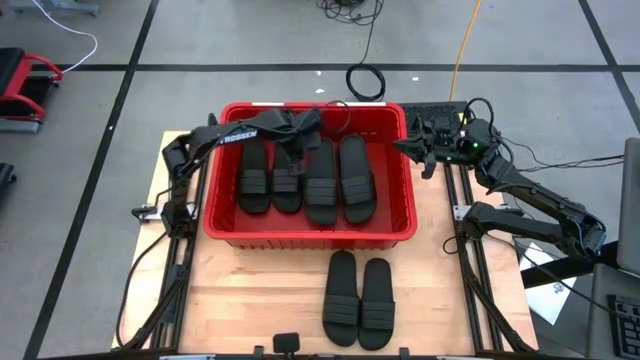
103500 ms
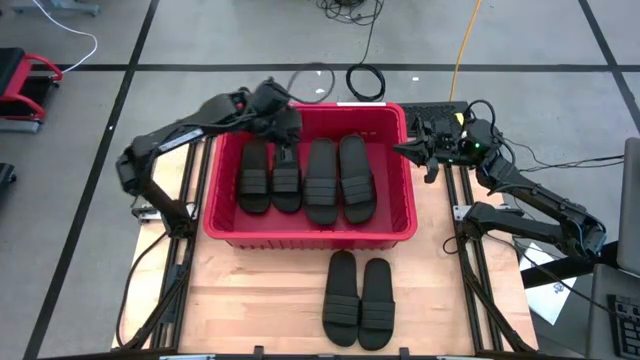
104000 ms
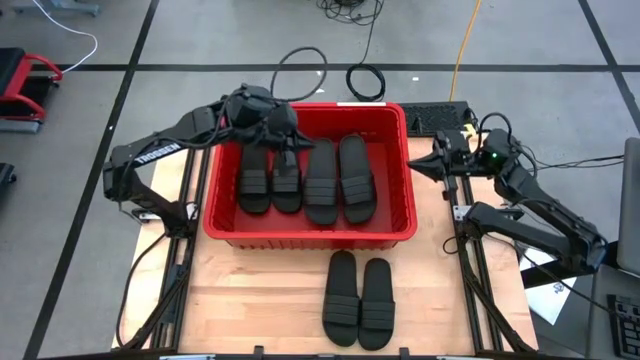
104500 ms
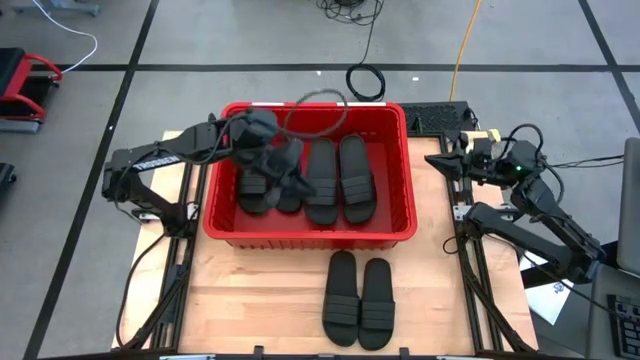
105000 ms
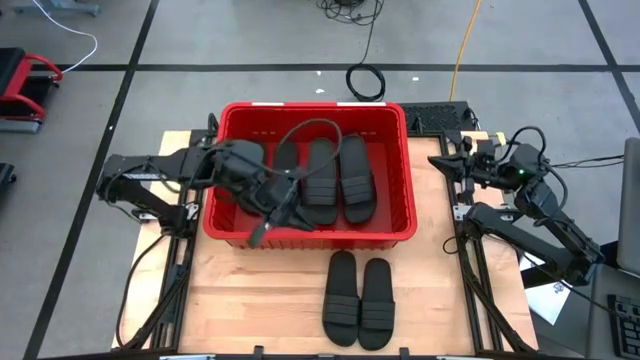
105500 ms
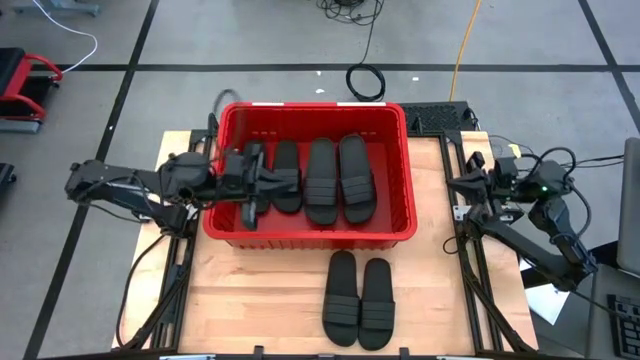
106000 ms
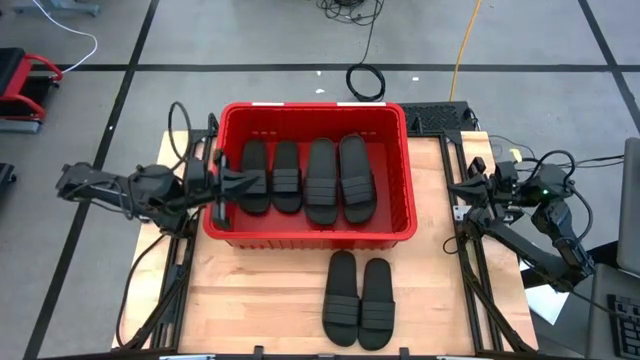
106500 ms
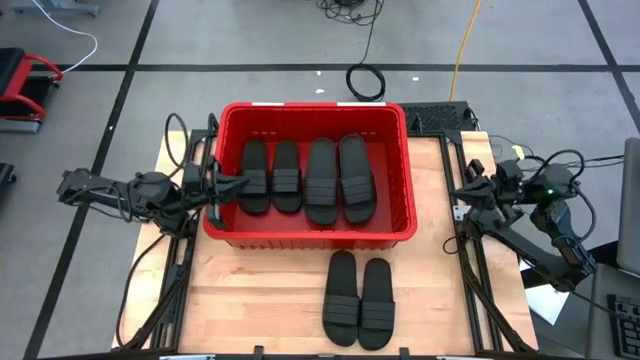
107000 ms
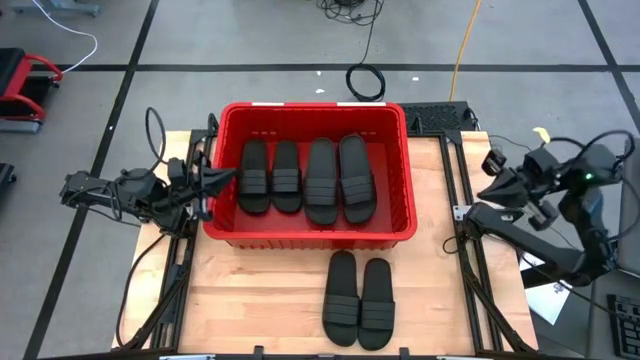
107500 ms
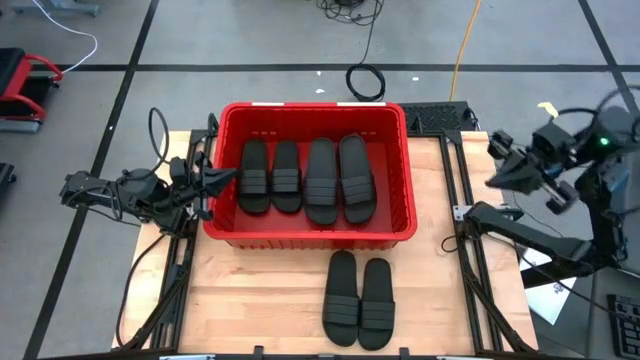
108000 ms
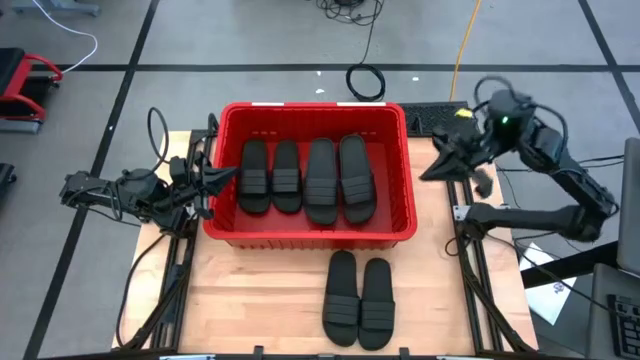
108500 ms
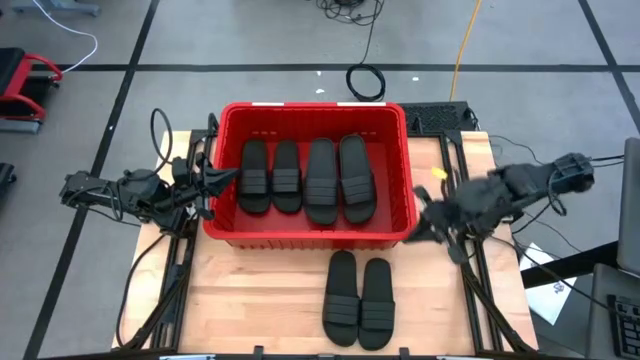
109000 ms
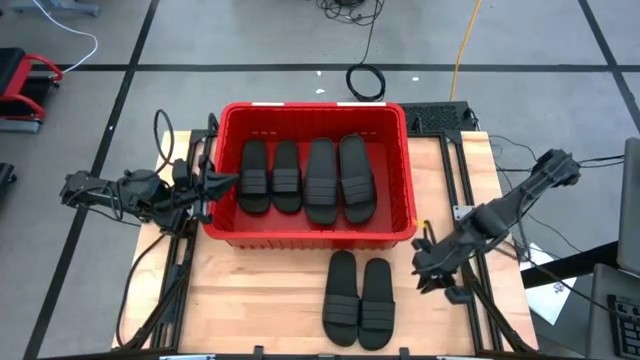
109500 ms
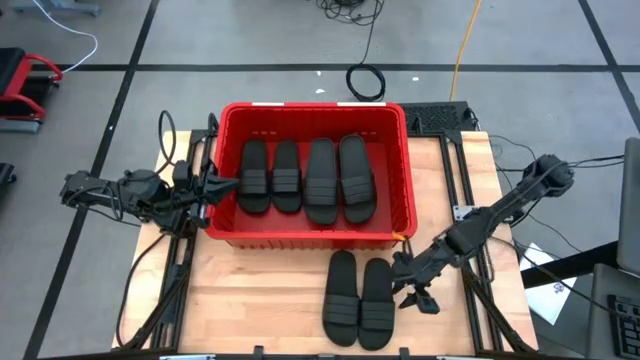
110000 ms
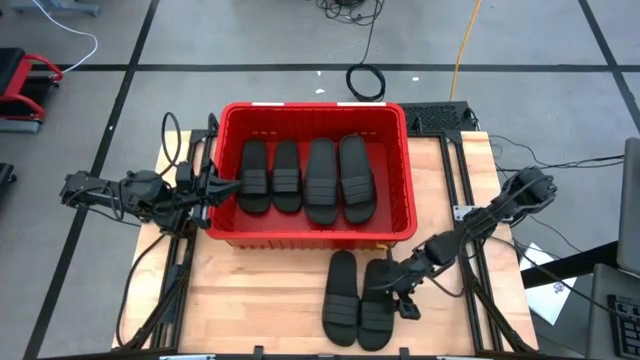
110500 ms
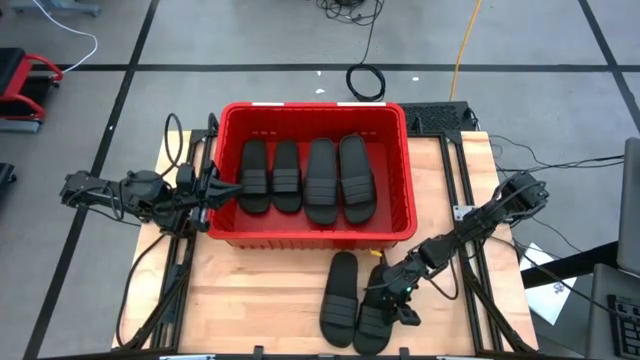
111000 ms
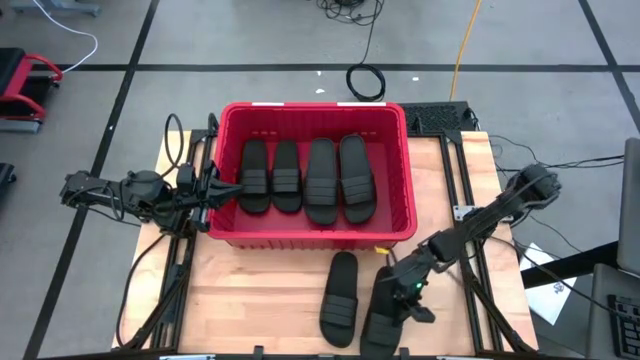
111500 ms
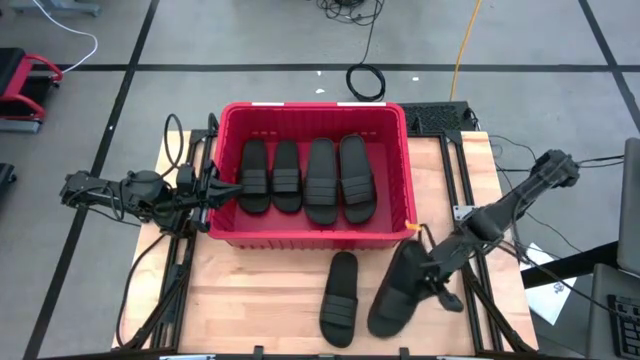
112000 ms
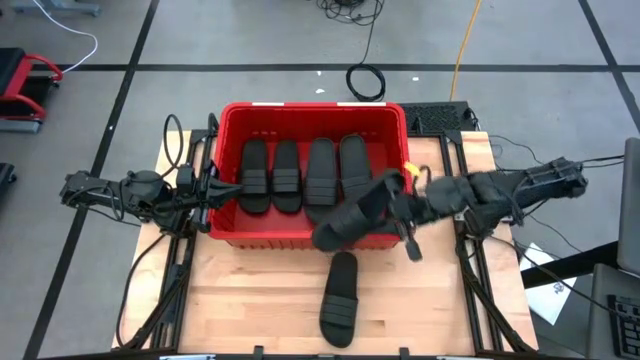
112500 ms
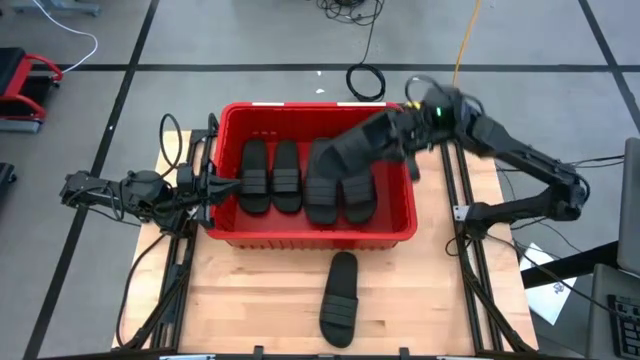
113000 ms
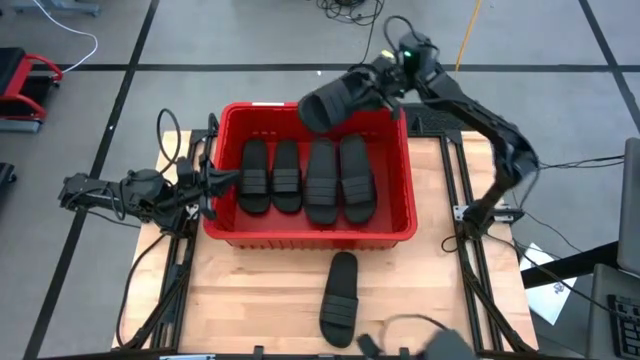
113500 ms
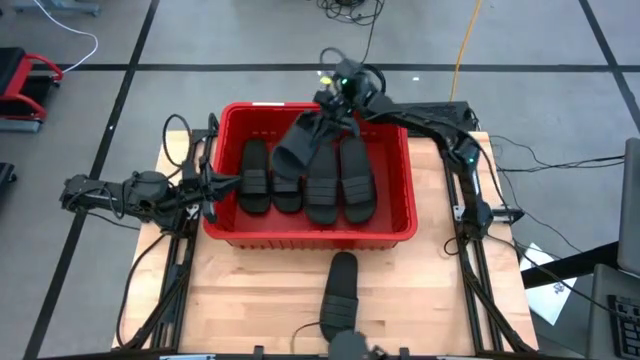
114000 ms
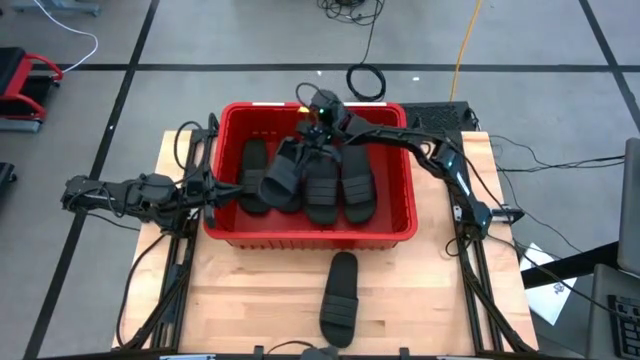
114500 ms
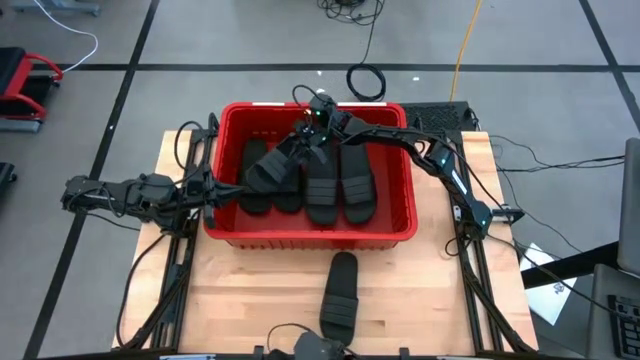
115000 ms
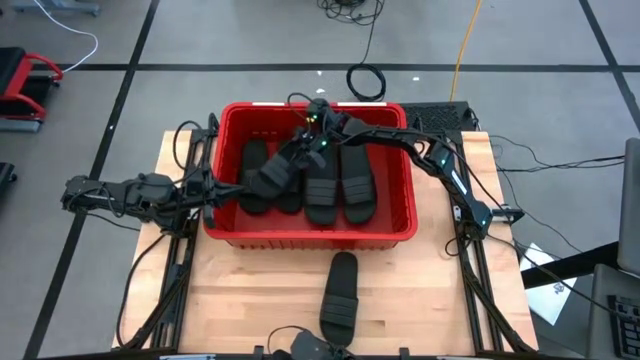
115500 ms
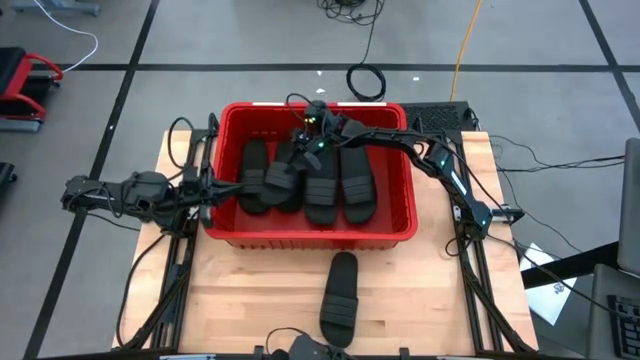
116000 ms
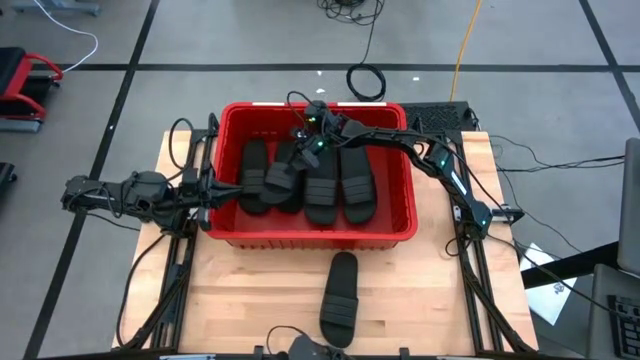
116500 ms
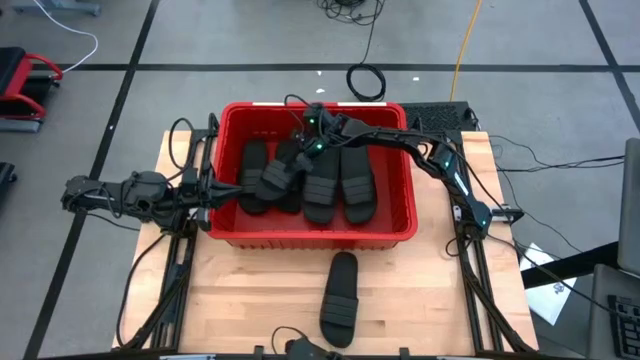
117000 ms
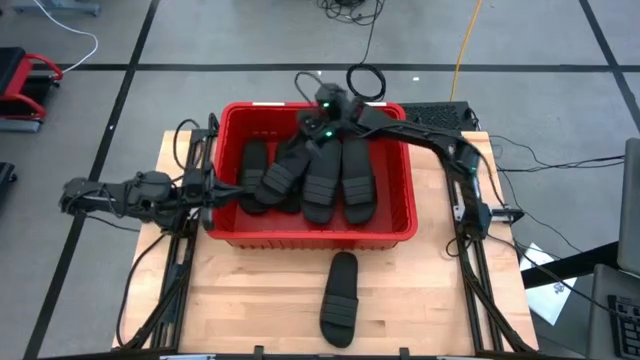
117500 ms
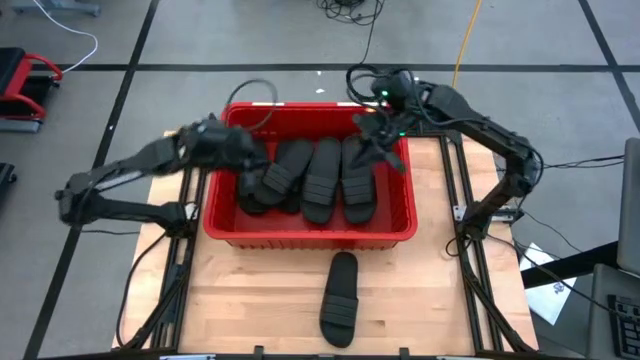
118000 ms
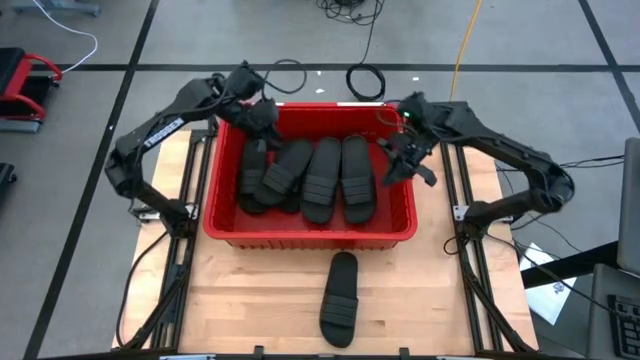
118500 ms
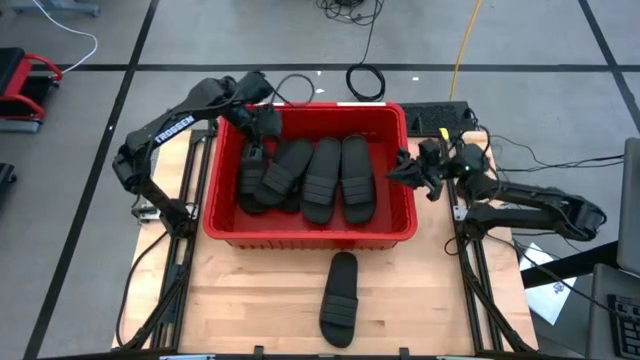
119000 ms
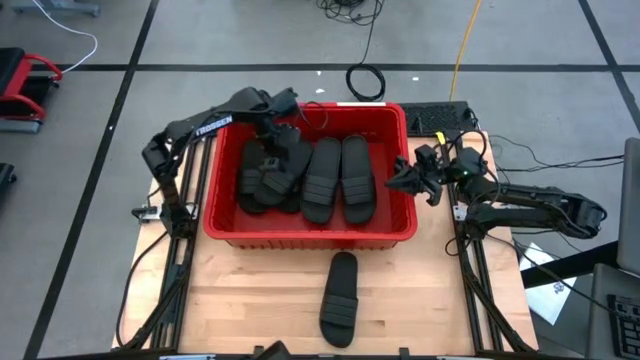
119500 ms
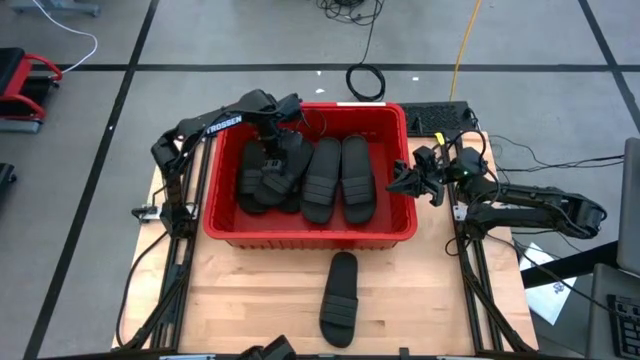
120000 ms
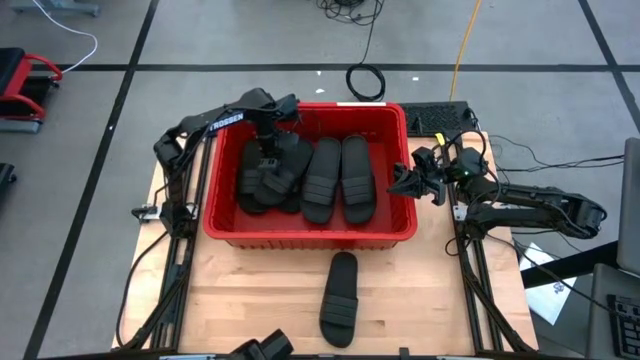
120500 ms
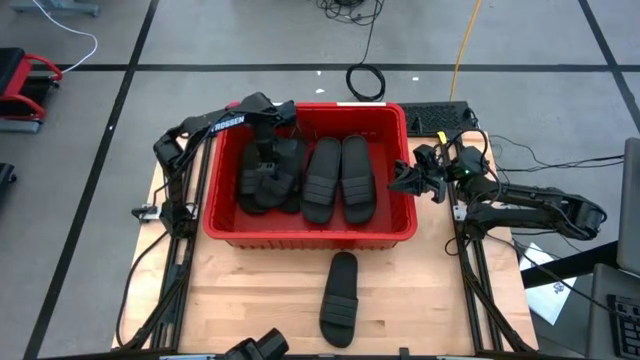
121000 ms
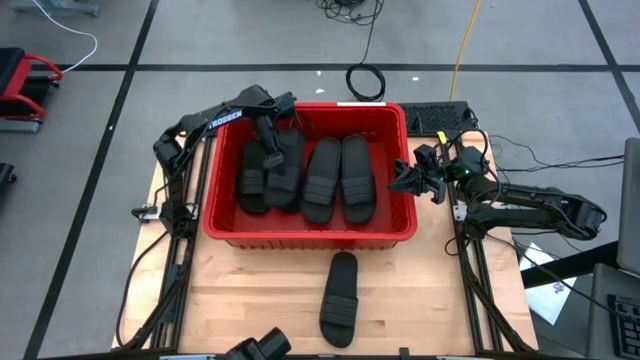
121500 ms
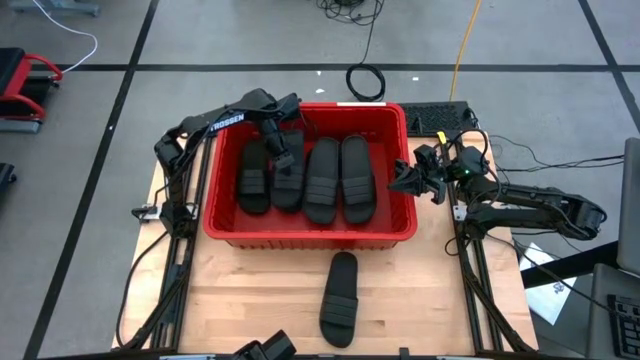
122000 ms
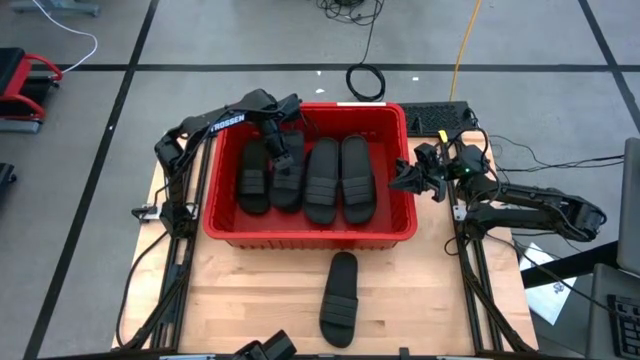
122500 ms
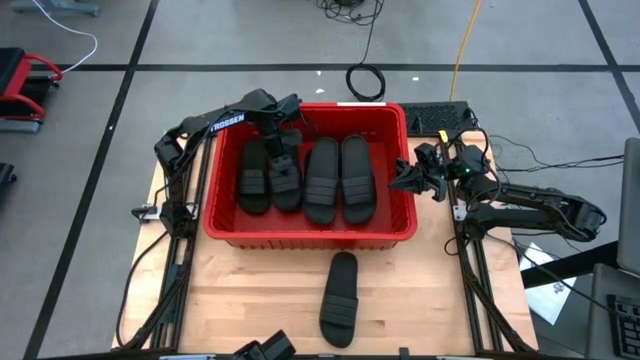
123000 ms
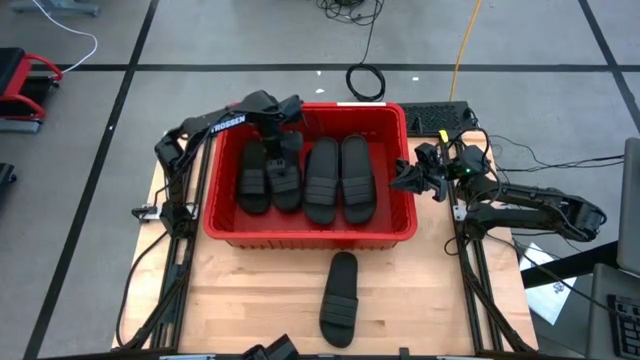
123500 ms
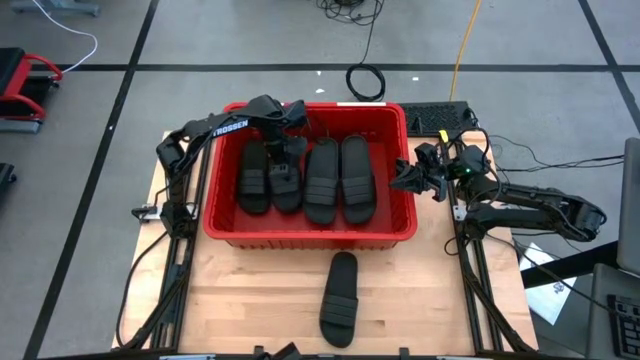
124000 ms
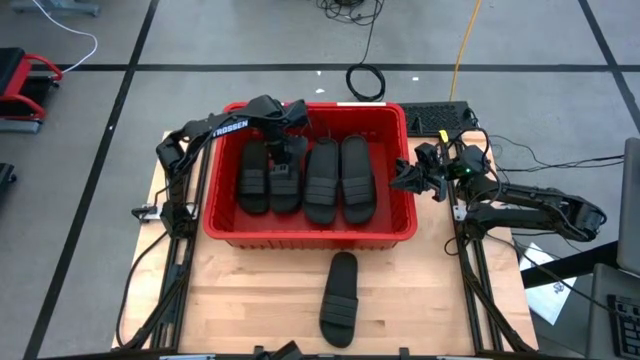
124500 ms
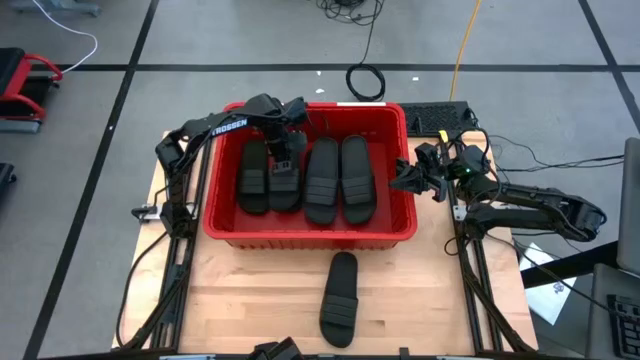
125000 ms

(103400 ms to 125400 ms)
Task: Pick and place slides into bin
Put the slipper on top of the slipper inside the bin
